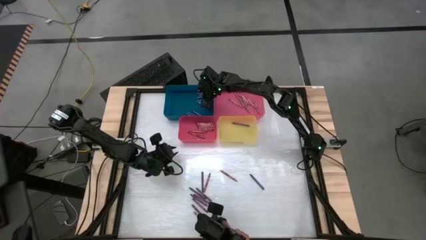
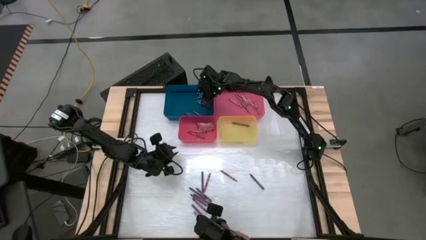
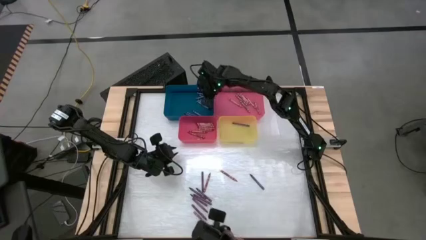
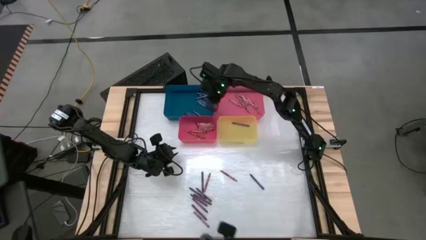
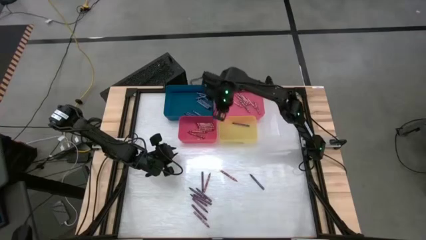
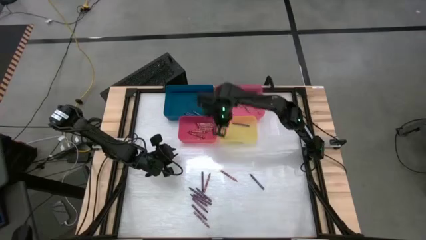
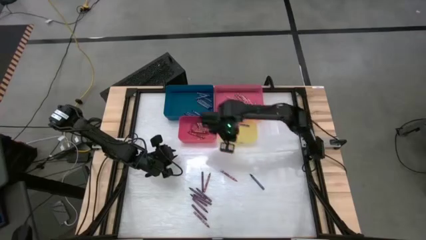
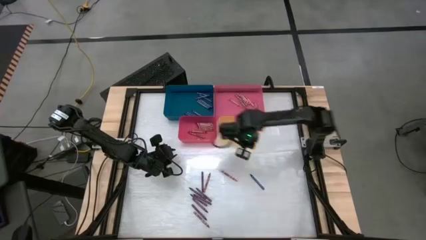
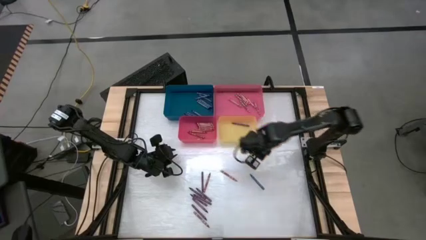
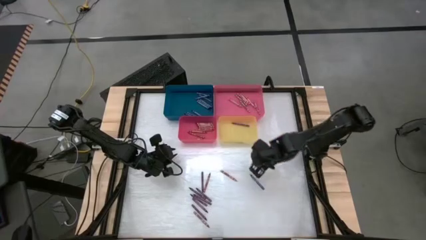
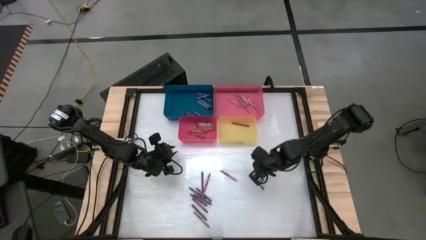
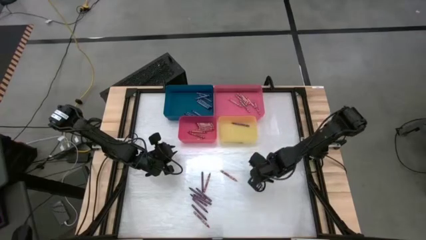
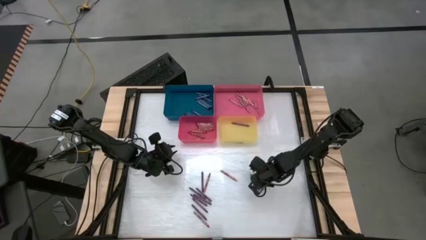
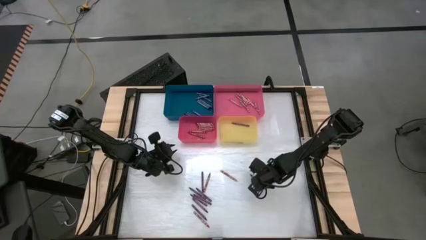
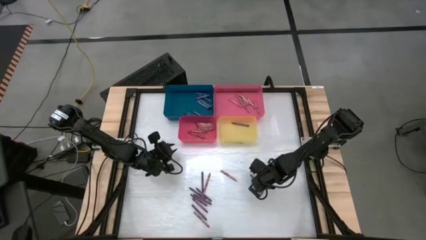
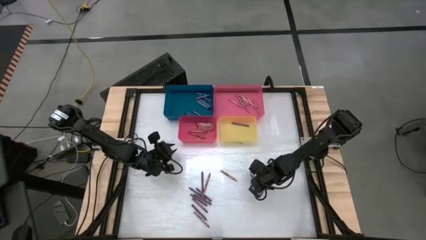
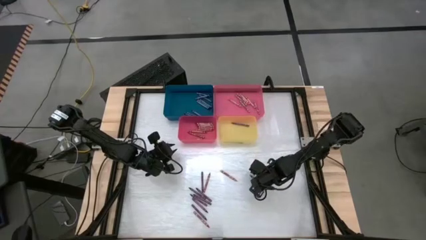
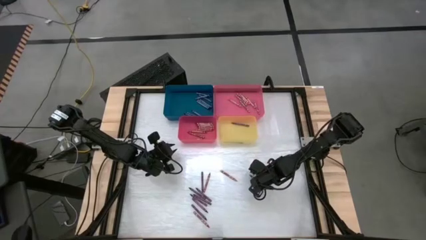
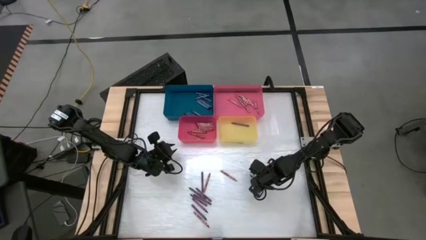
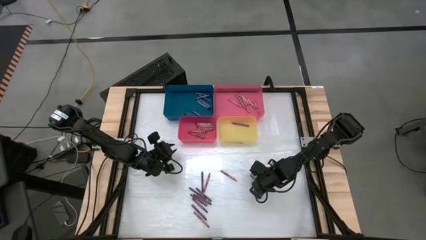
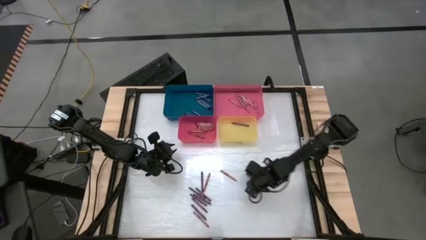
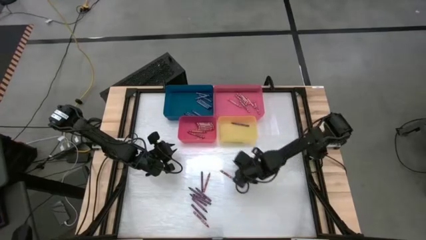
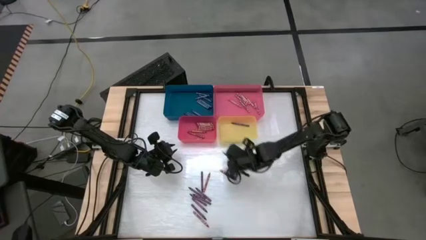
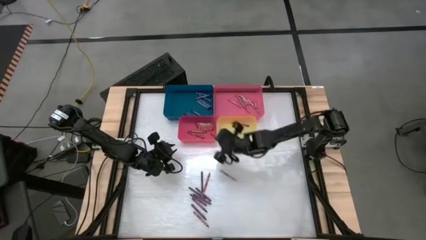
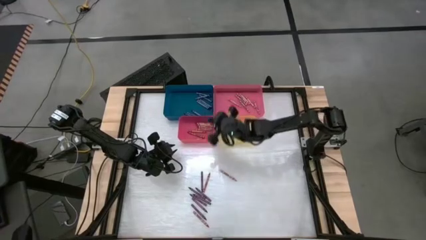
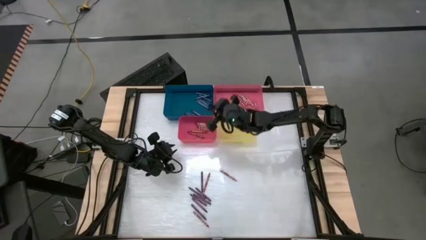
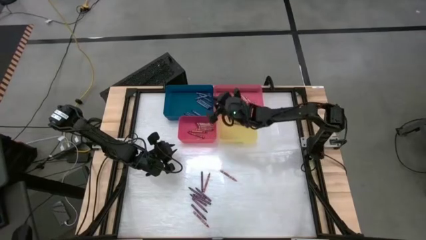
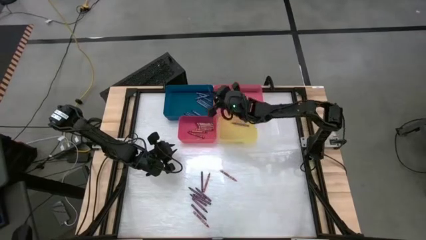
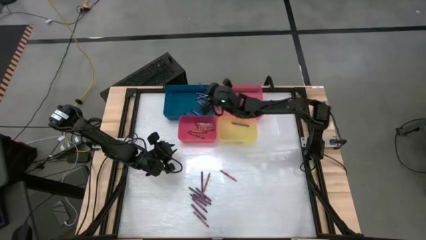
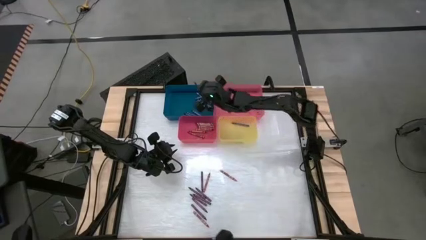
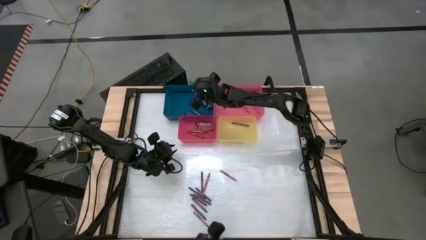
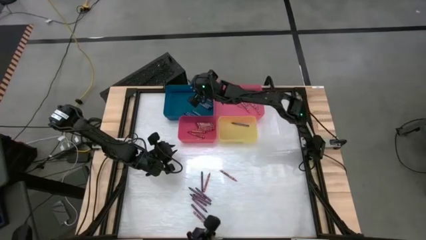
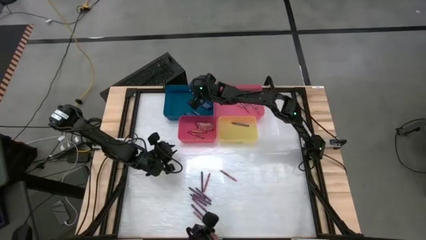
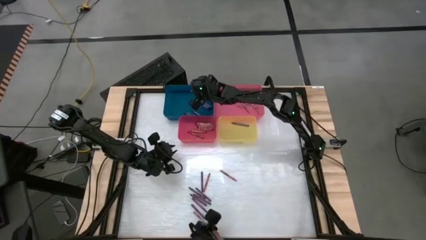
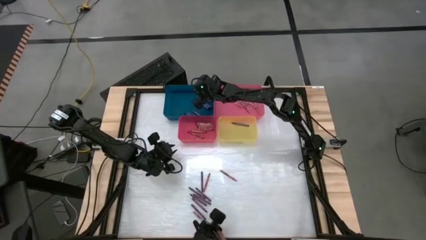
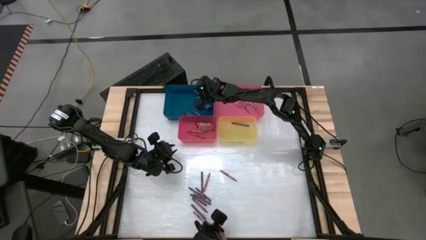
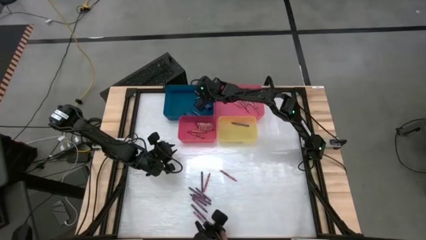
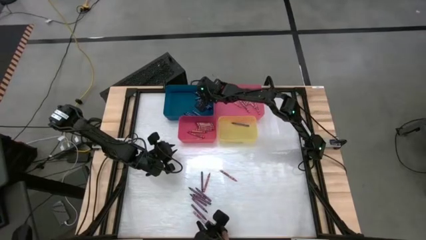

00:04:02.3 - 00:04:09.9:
Task: Sort crayons
Put the blue crayon into the blue bin

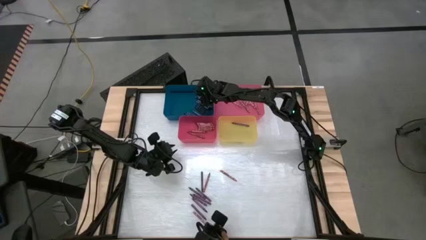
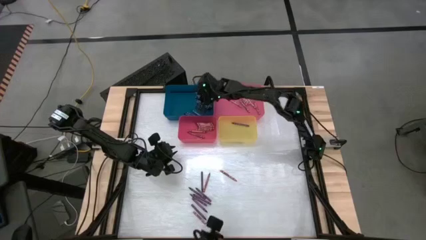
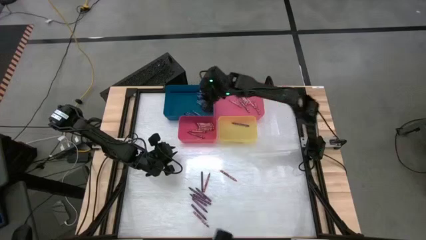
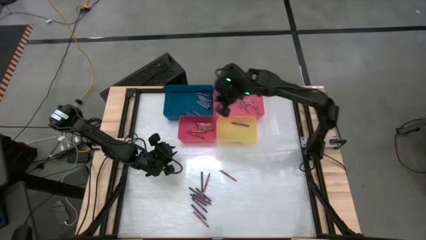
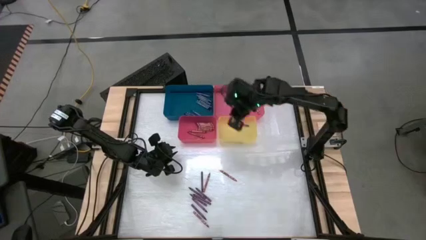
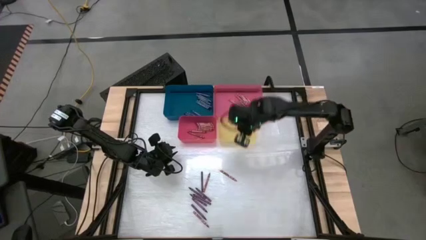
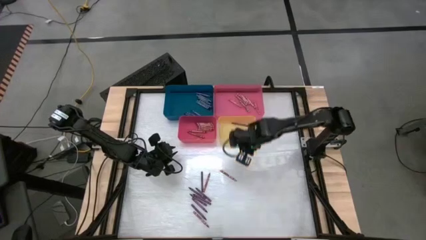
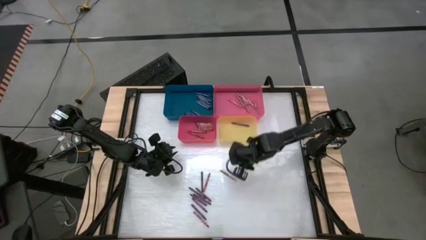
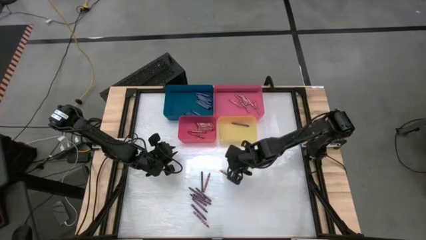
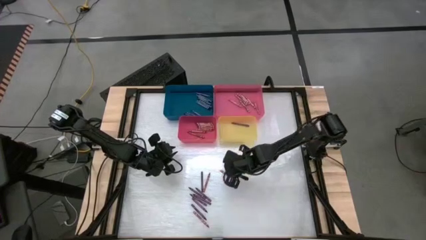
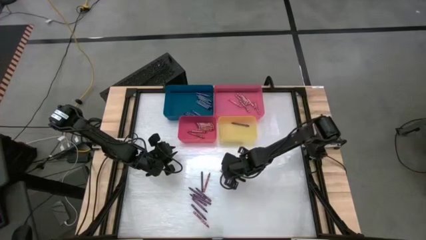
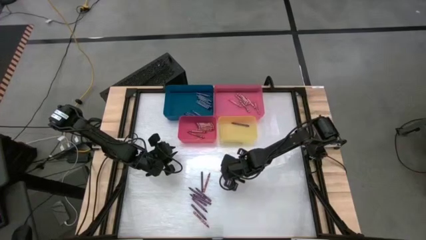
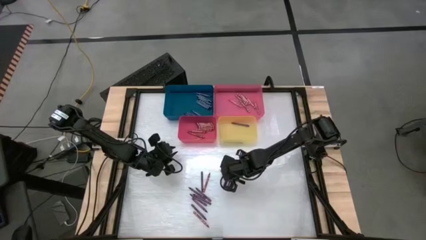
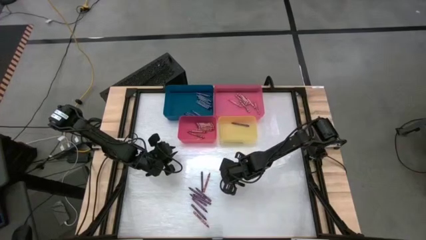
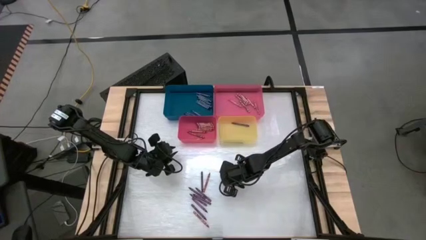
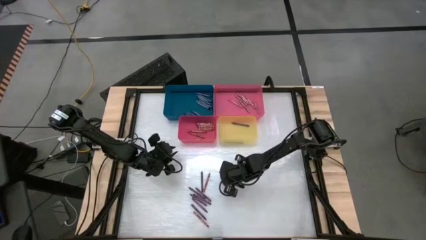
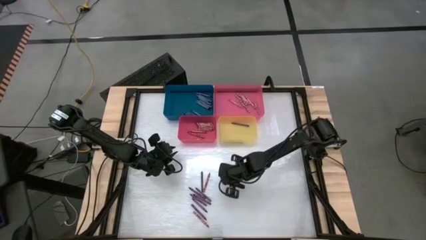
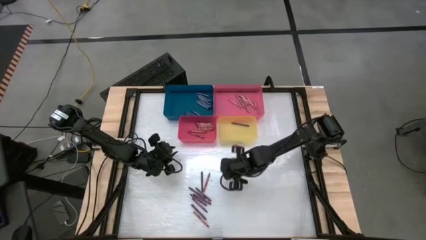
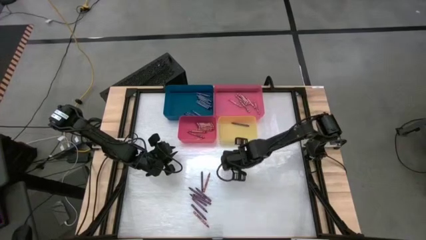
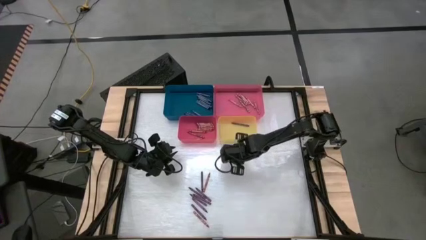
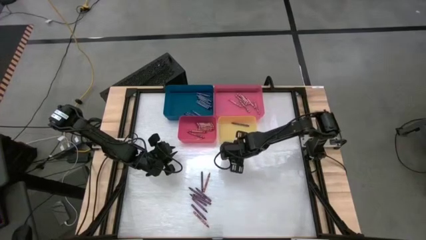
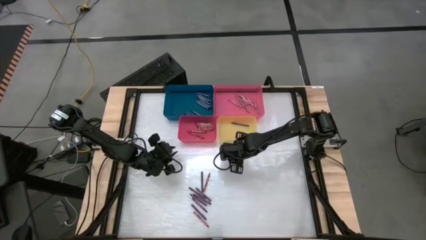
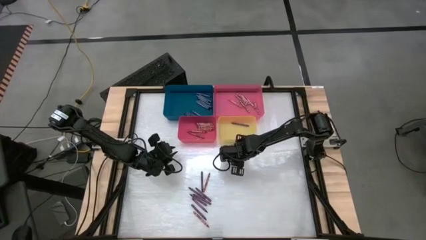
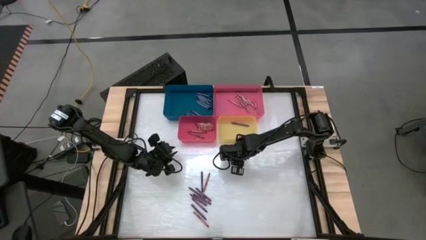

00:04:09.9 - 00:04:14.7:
Put the pink crayon into the pink bin

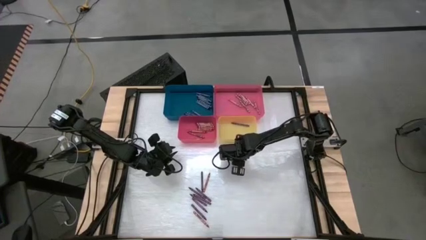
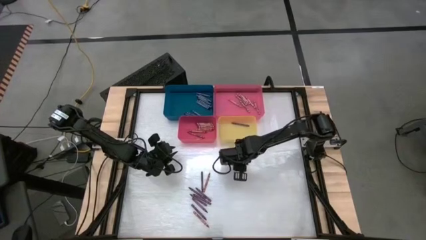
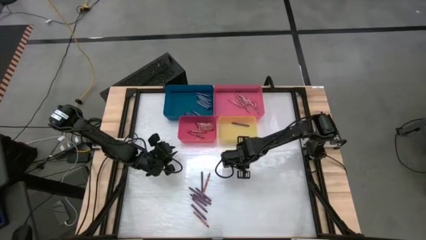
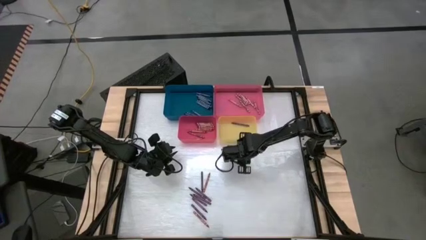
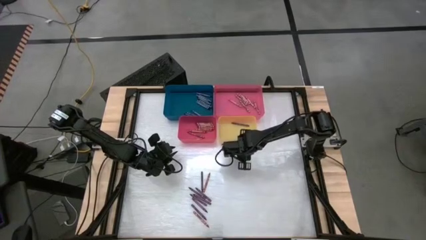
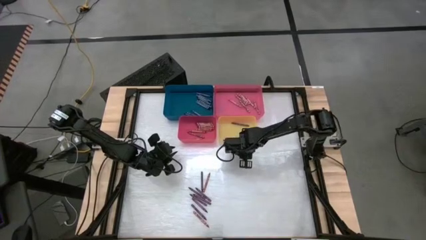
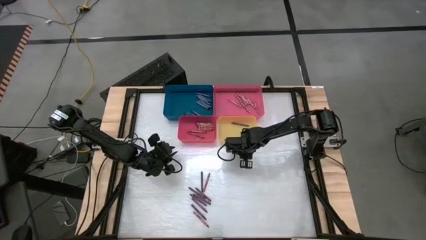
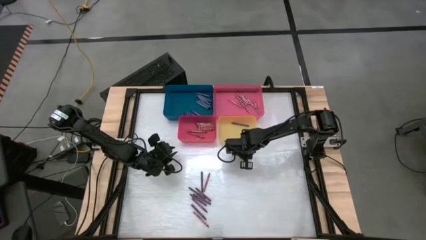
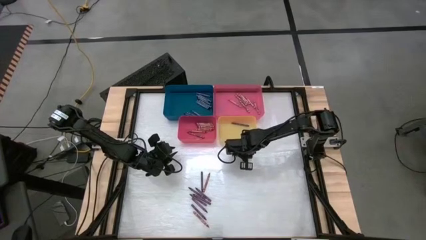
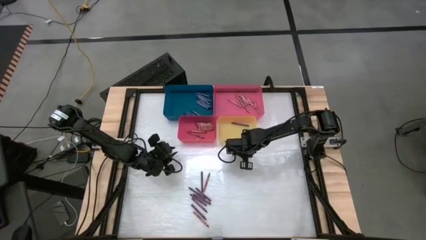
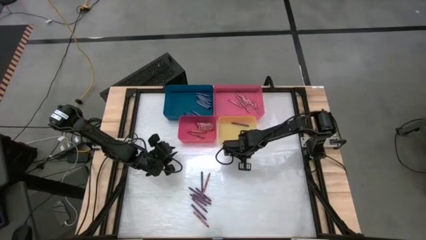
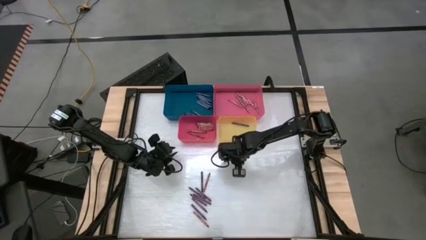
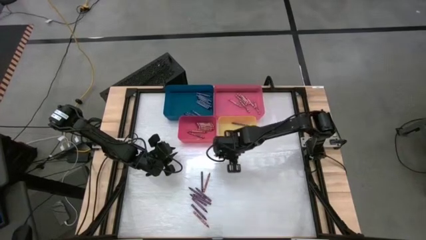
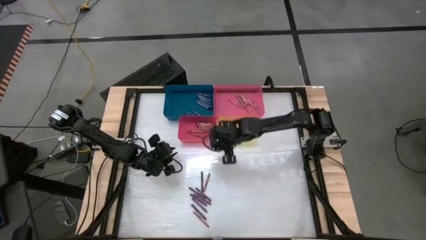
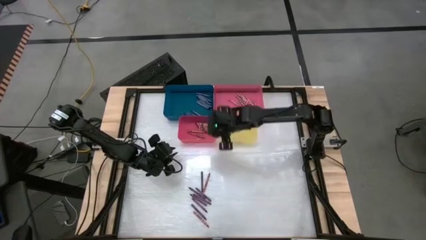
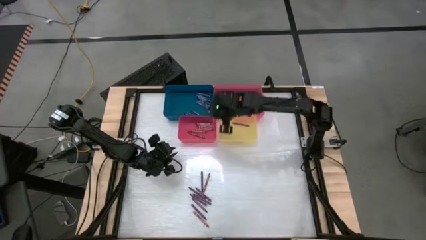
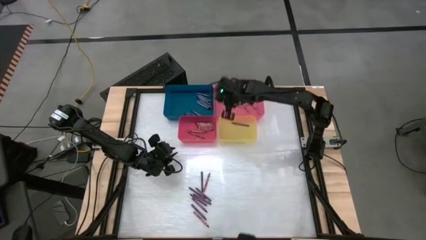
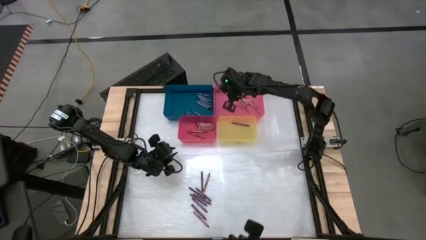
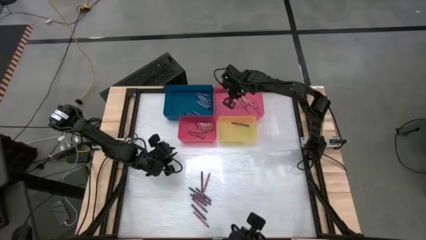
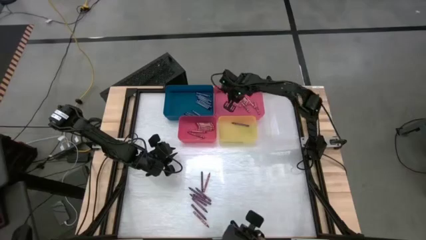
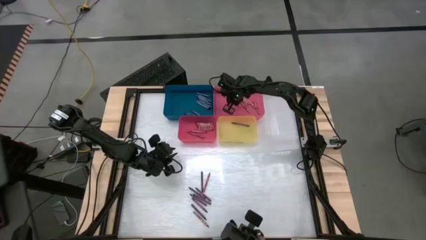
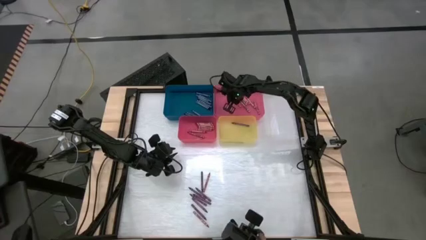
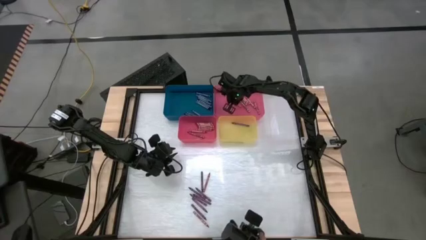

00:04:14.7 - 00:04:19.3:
Put the pink crayon into the pink bin
